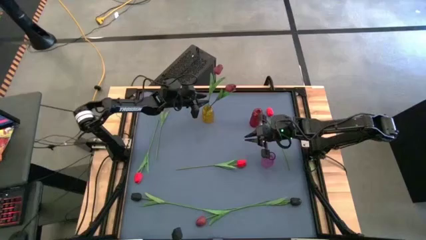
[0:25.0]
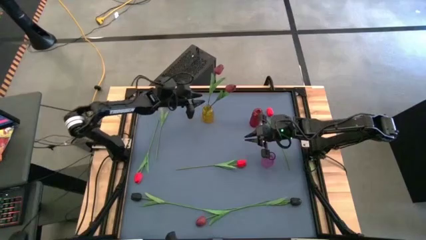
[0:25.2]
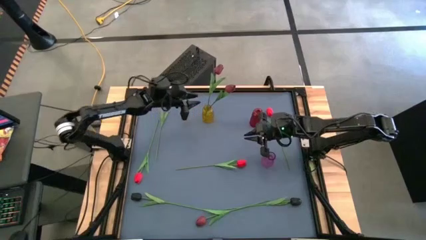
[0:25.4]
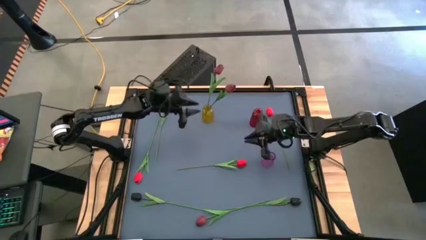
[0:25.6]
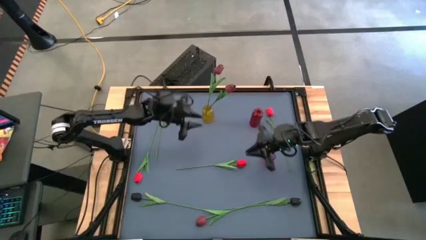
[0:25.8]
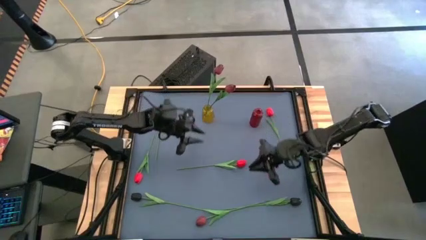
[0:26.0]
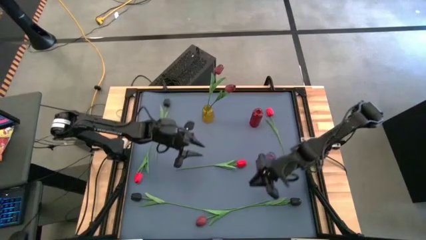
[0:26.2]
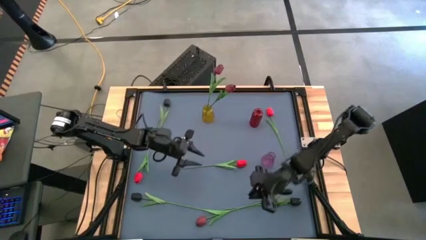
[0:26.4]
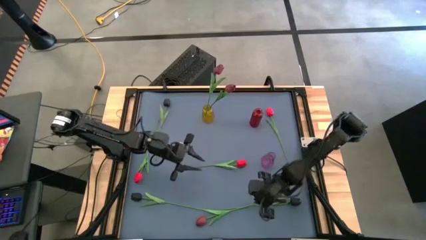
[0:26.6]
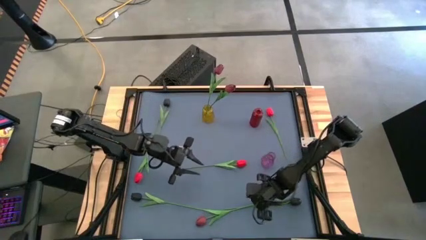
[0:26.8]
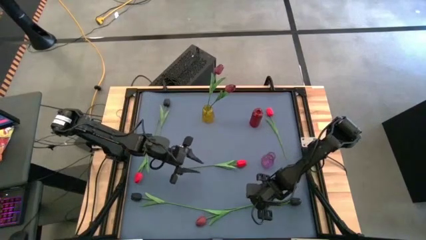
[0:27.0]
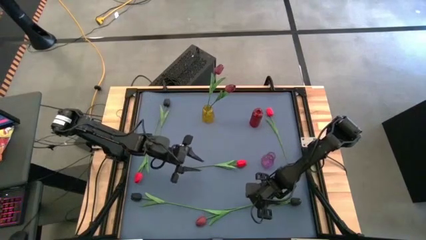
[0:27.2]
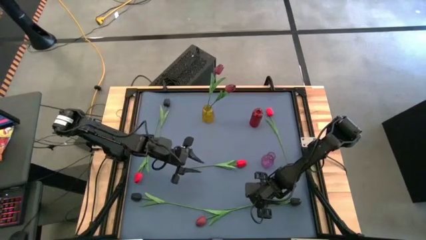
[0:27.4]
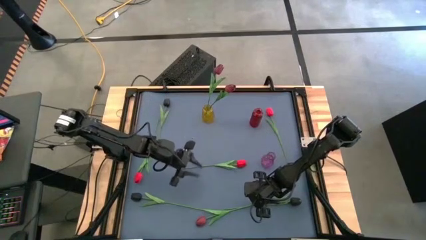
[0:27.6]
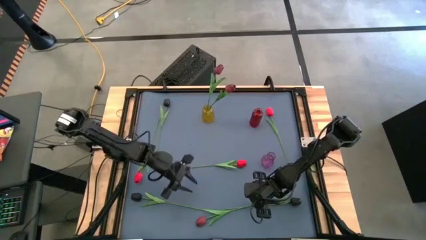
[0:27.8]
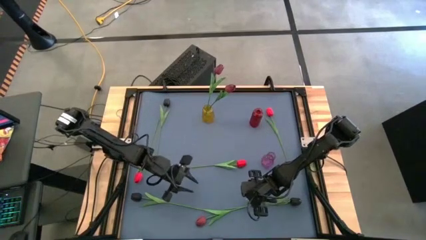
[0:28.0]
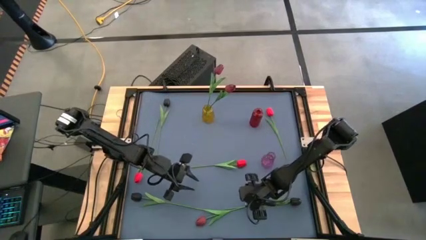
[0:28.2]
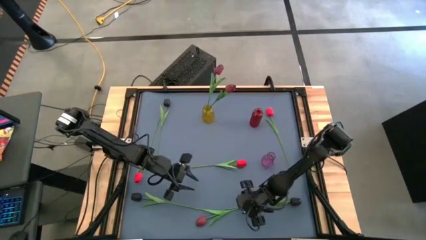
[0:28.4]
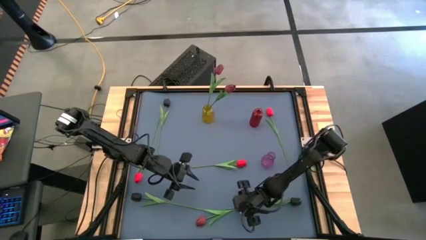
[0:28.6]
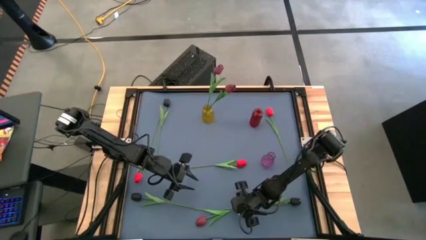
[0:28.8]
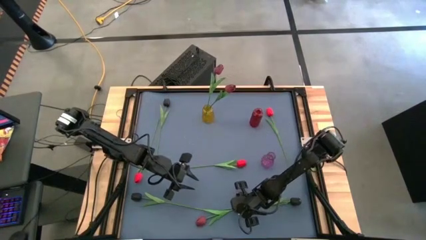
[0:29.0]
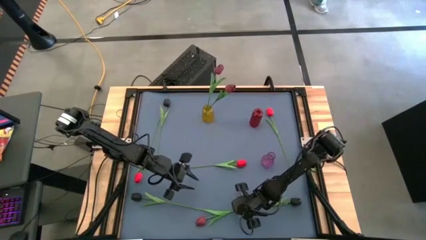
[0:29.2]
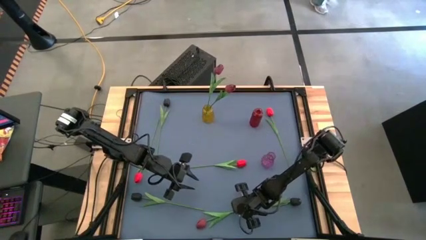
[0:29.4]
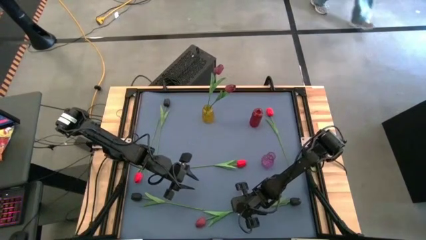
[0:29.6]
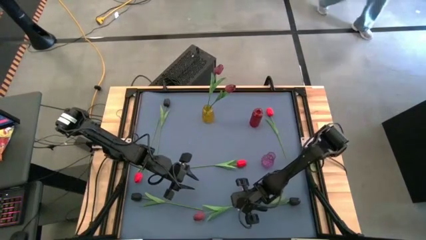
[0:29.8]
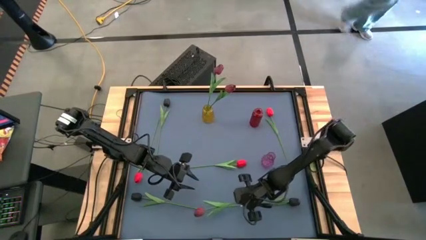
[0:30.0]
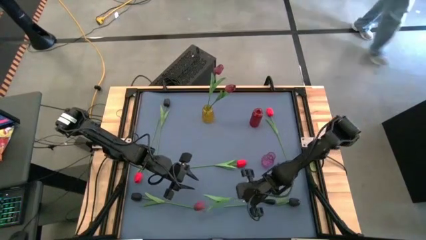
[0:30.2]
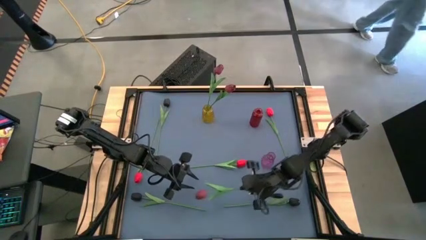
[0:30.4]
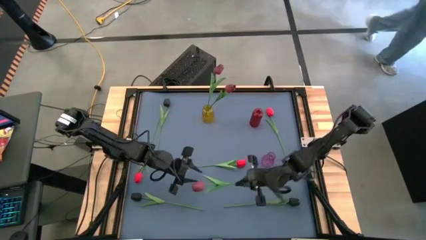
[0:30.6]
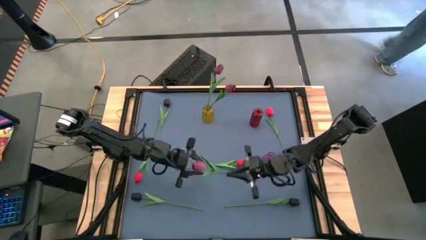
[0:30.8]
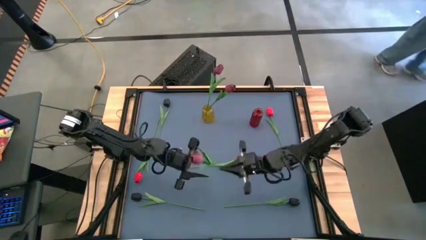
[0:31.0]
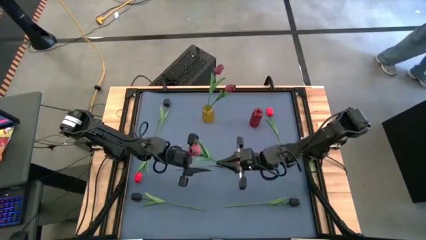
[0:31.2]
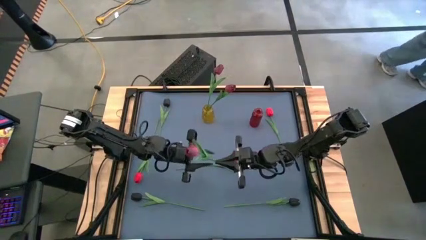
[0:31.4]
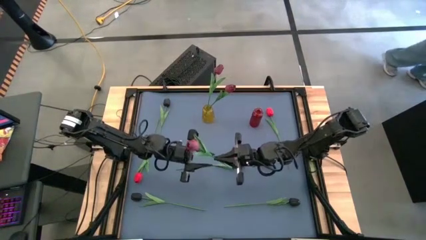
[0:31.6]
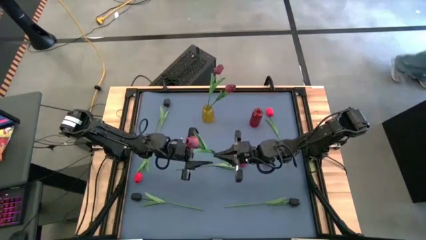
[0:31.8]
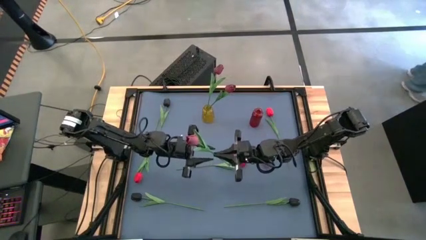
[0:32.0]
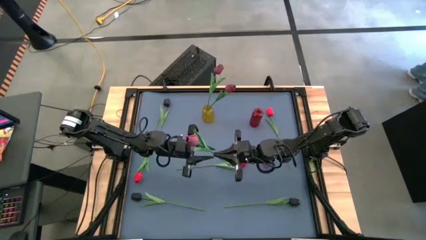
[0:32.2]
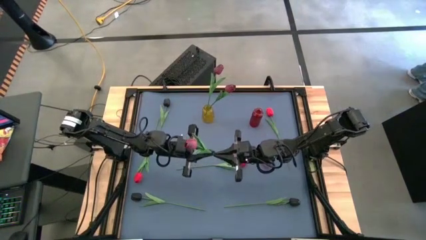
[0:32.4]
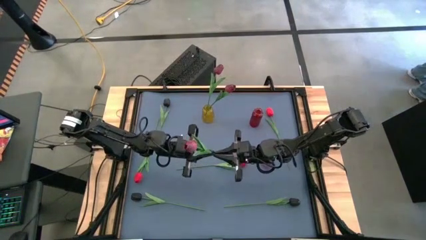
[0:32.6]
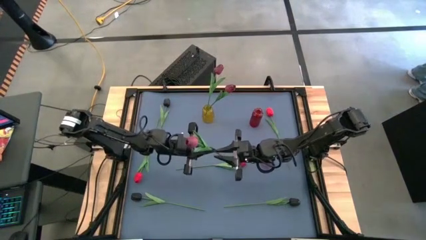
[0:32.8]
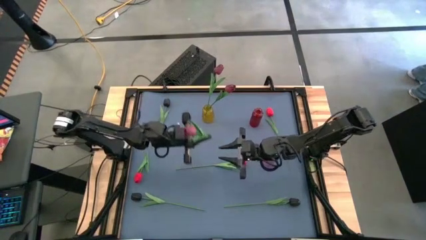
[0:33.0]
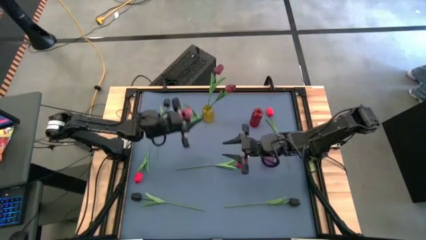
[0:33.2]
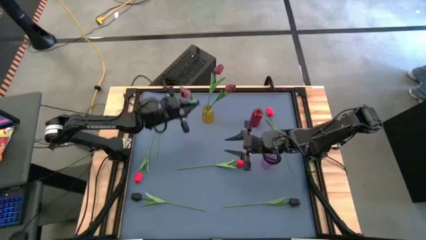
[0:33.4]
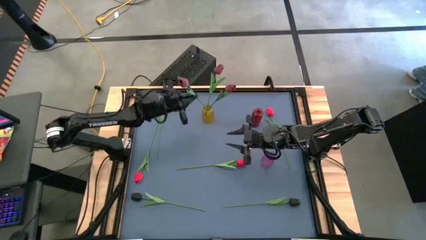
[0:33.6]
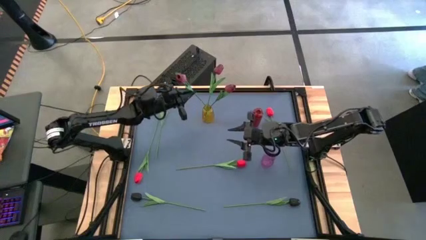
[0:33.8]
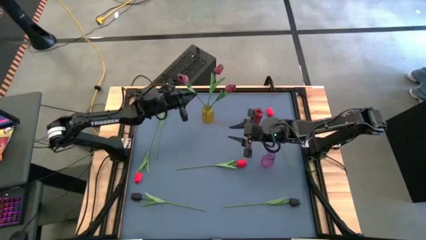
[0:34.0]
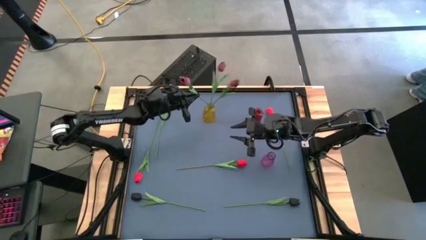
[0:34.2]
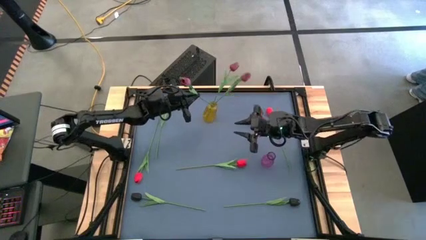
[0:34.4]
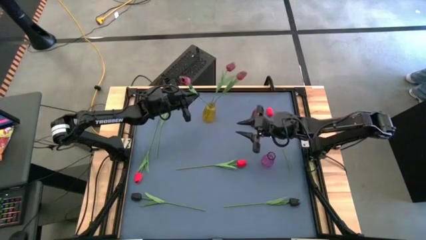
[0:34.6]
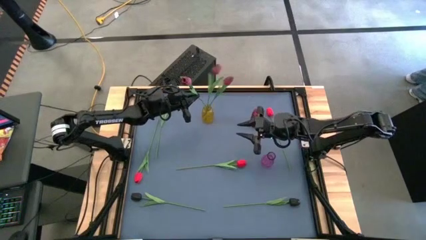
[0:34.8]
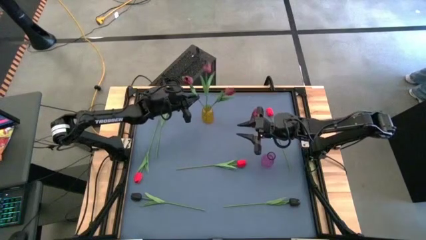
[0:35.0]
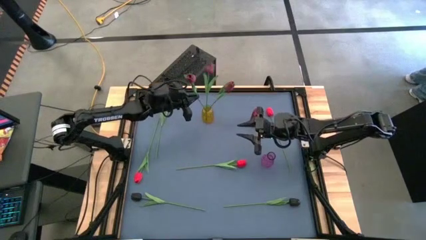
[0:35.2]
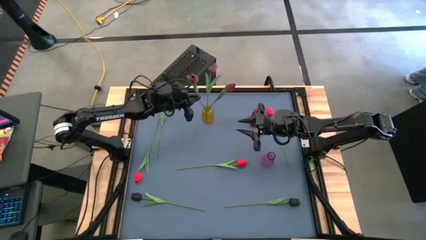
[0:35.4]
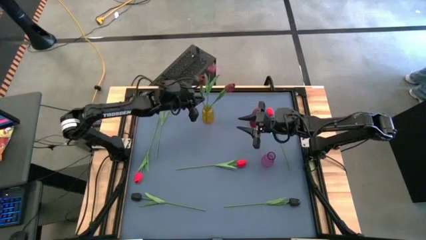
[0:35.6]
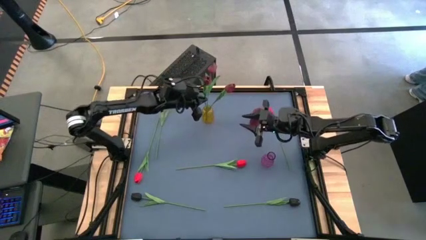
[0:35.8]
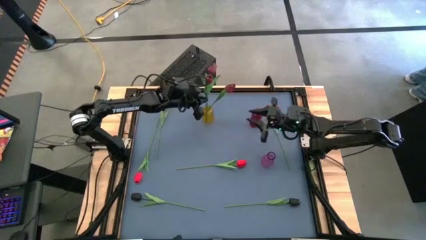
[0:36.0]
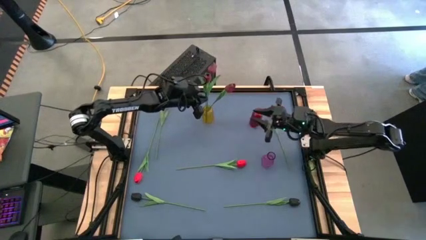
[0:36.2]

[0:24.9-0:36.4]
Task: Sort flowers into vase by color
Put the pink flower into the yellow vase
